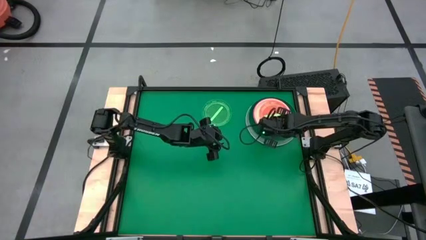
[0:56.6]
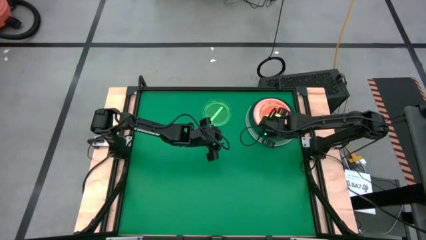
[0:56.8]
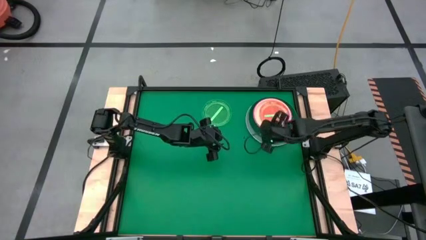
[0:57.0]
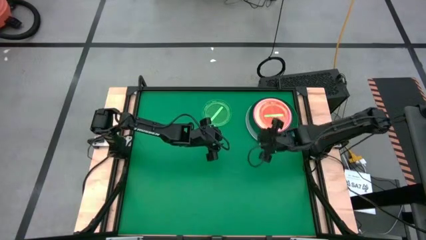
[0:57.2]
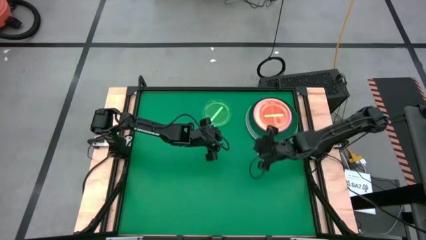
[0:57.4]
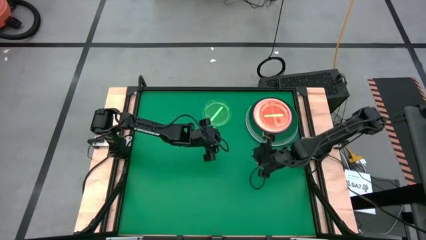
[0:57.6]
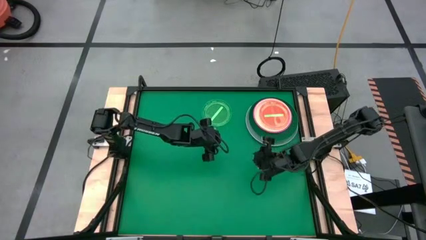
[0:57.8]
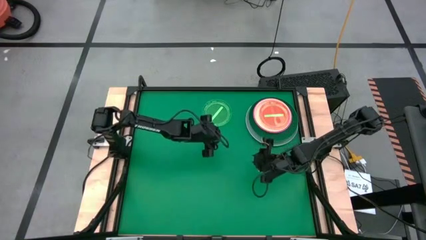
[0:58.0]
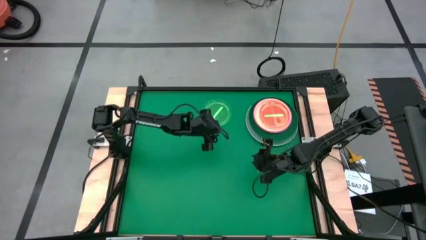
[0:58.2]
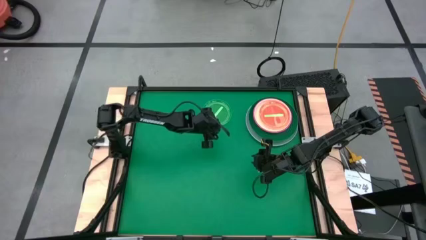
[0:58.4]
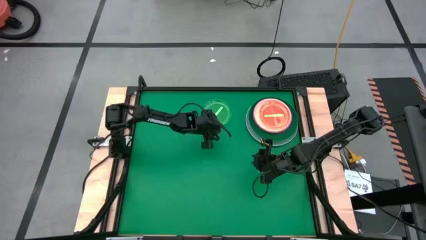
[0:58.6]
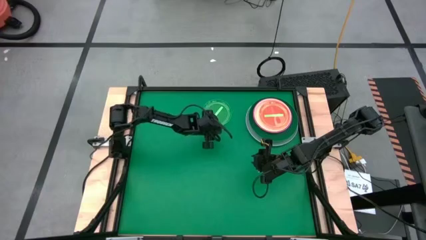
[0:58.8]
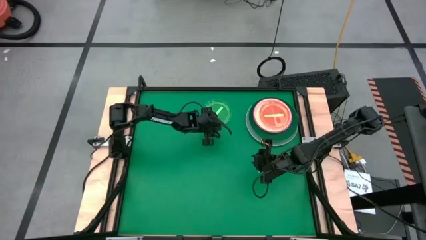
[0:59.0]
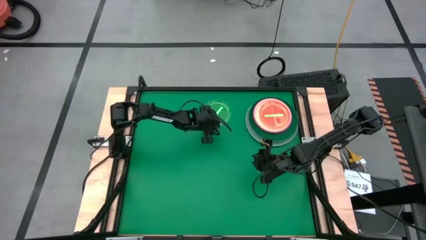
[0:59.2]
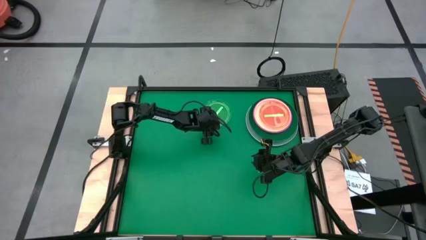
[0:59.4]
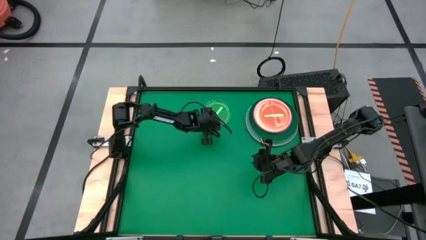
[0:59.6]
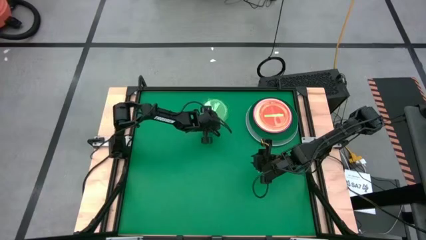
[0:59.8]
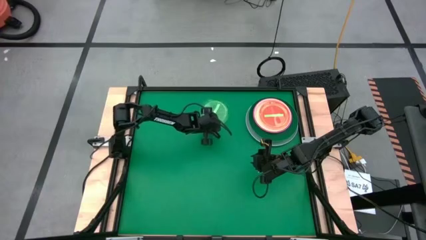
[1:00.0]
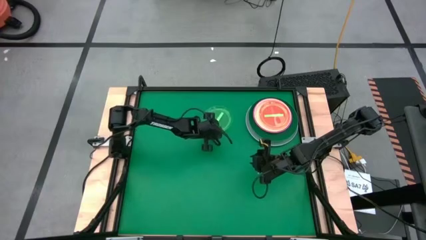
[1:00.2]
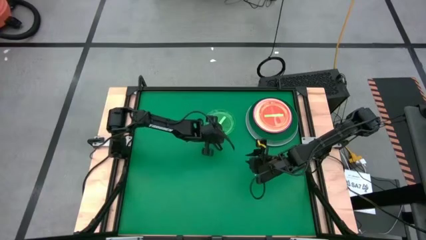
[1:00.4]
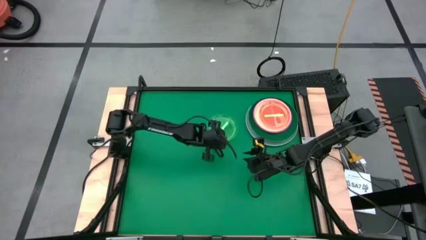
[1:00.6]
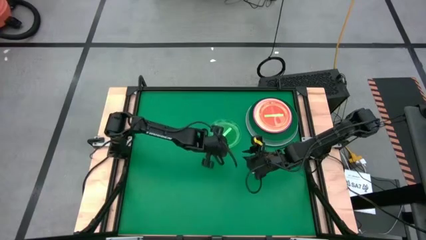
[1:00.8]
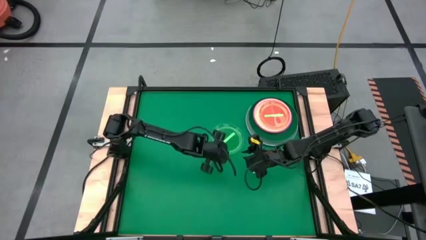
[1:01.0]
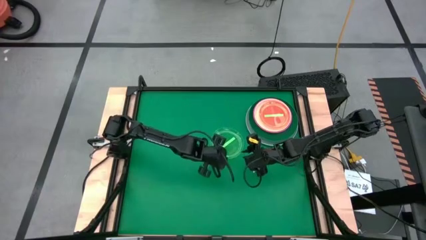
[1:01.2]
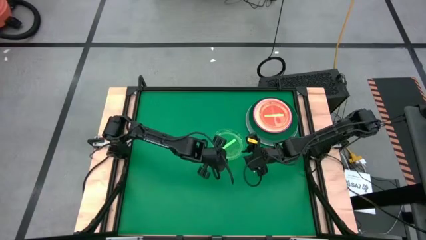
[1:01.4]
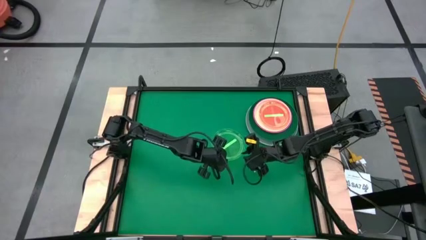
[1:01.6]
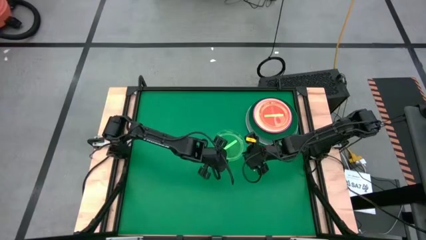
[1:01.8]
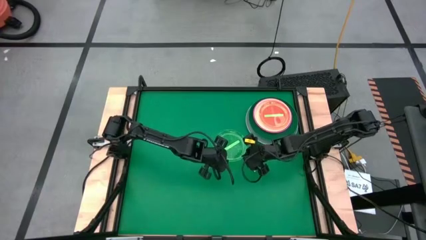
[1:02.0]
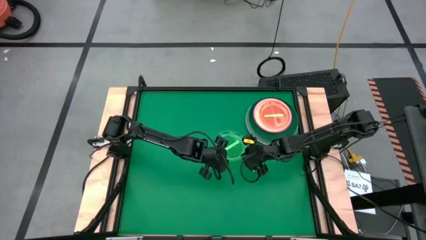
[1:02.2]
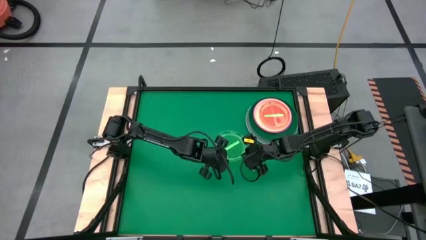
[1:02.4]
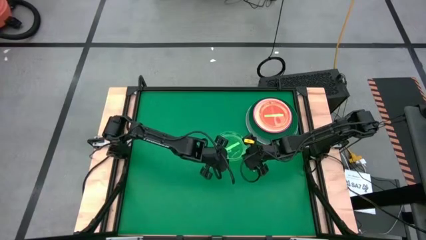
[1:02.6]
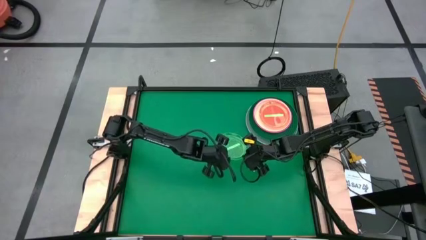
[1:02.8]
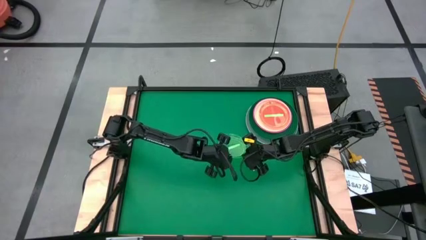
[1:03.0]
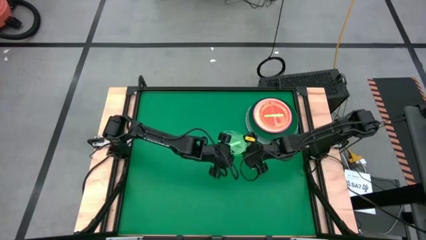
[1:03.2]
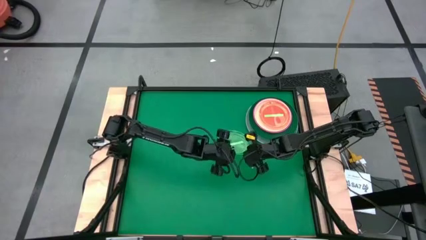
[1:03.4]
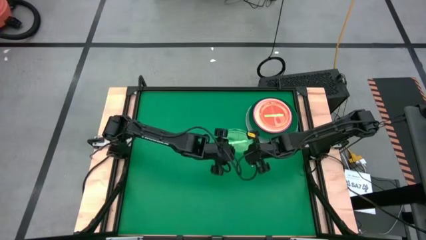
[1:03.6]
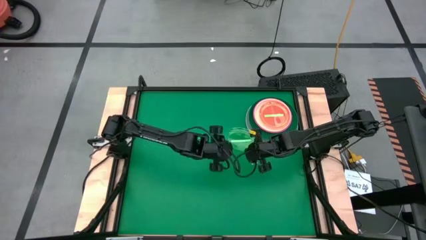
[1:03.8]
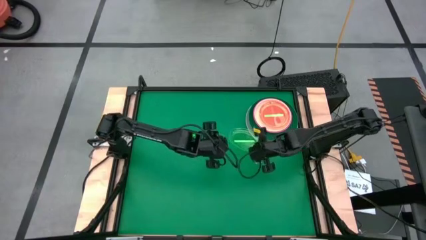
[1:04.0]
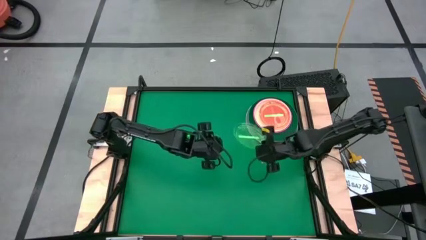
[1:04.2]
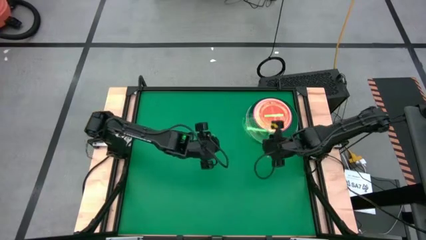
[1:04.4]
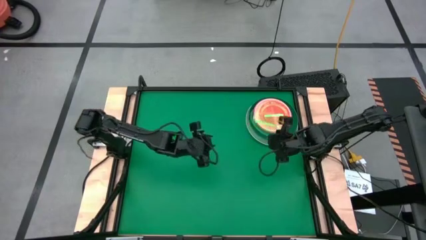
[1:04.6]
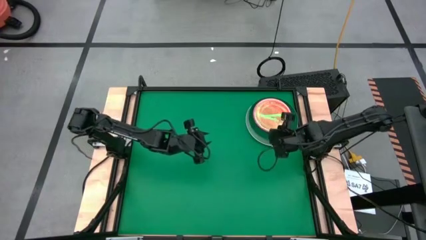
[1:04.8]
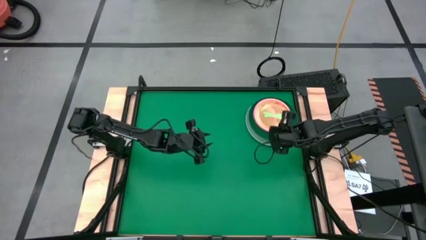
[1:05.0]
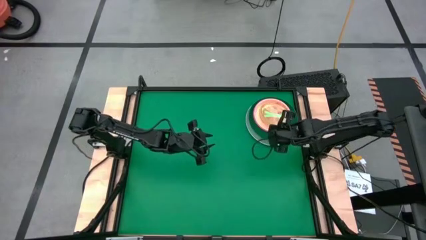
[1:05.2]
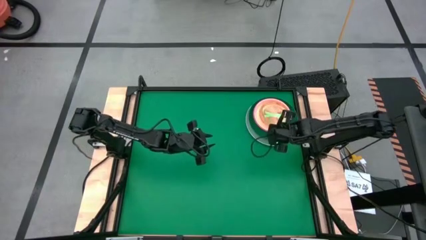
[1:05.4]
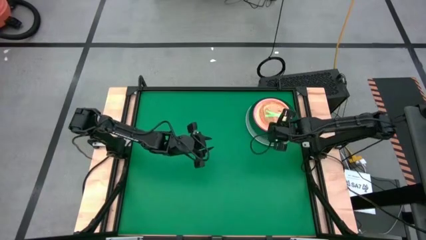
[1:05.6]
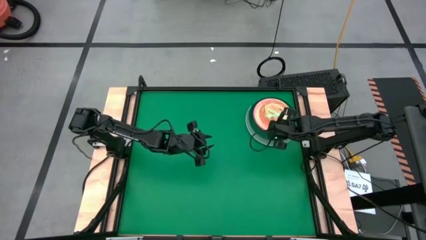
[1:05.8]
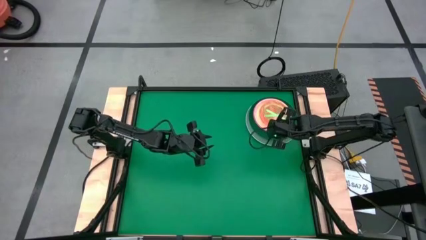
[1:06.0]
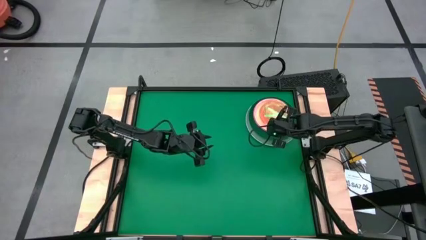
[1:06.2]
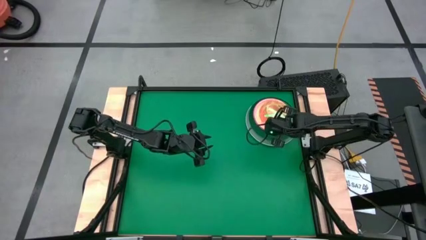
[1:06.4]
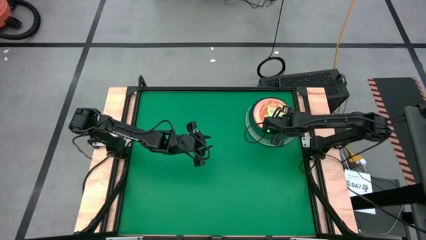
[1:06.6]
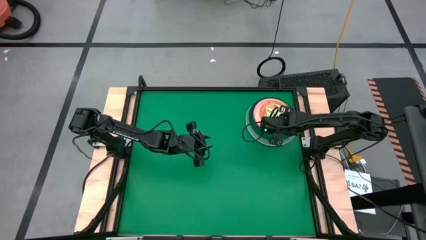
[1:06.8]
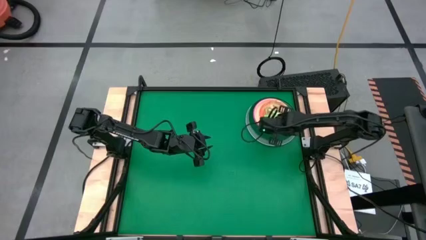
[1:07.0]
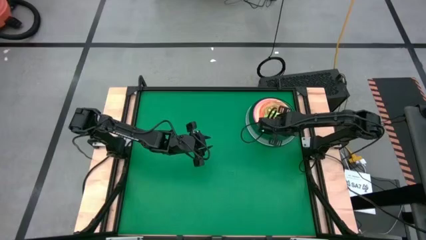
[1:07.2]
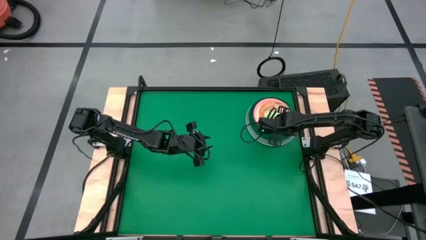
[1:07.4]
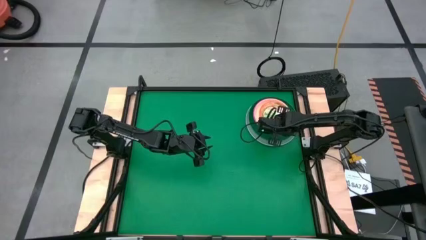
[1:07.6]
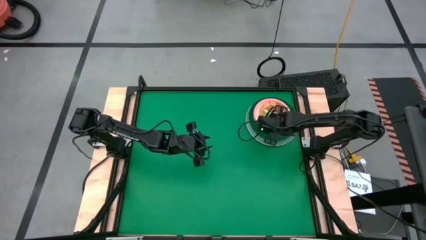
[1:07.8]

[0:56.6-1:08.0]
Task: Stack plastic plates
Stack the light green plate on top of the light green plate
